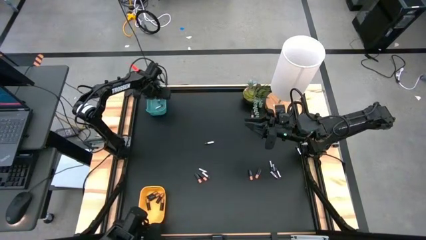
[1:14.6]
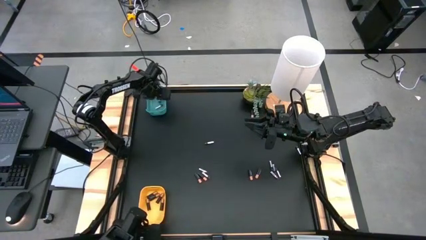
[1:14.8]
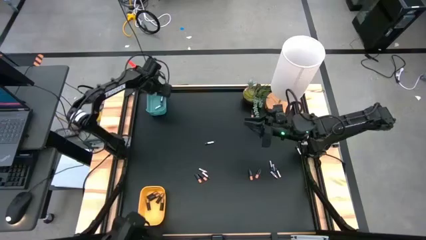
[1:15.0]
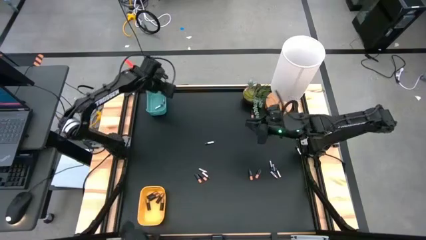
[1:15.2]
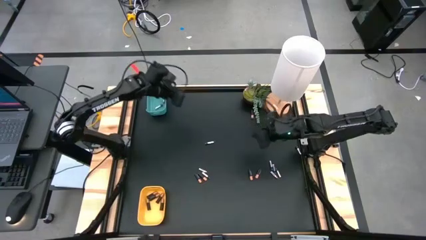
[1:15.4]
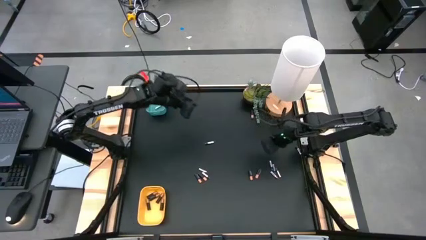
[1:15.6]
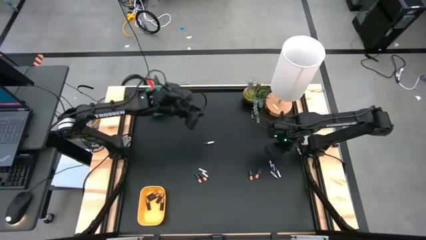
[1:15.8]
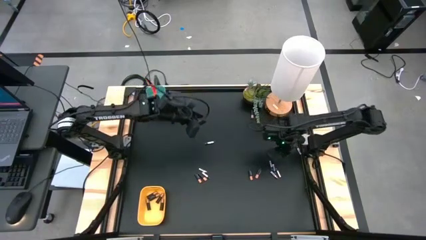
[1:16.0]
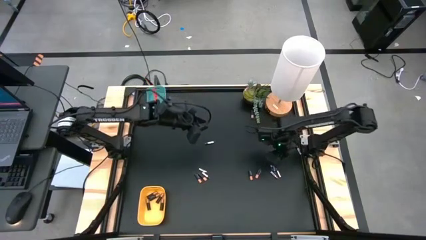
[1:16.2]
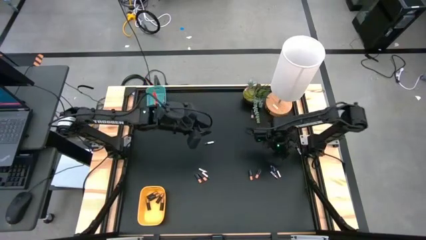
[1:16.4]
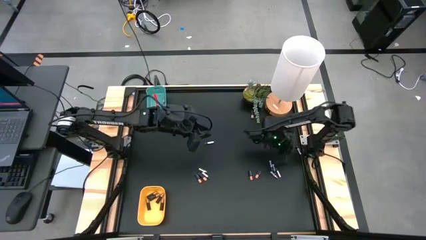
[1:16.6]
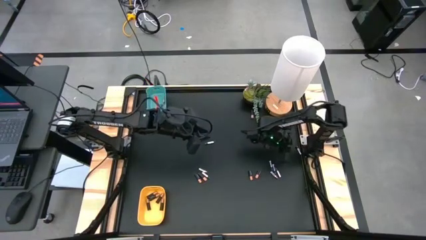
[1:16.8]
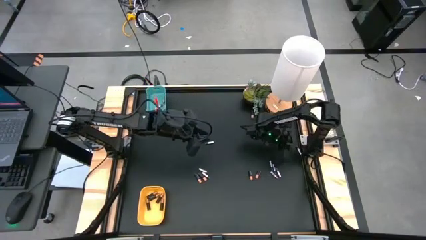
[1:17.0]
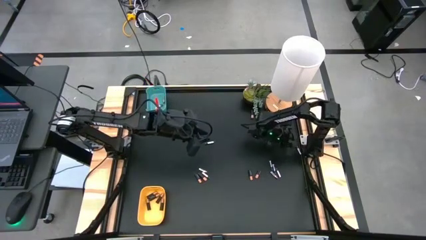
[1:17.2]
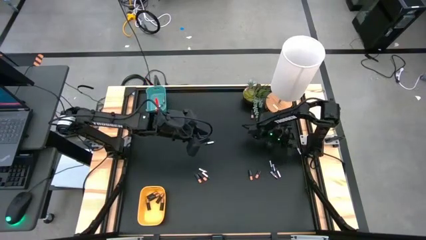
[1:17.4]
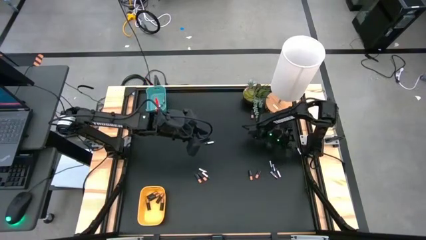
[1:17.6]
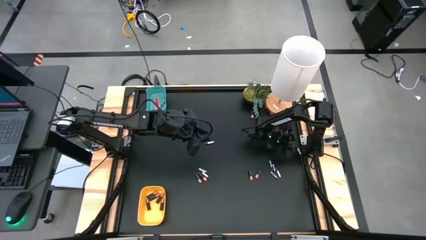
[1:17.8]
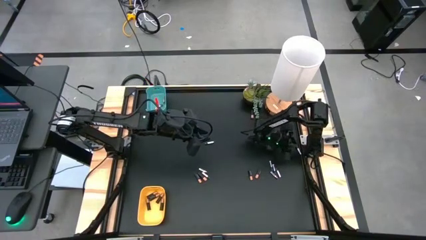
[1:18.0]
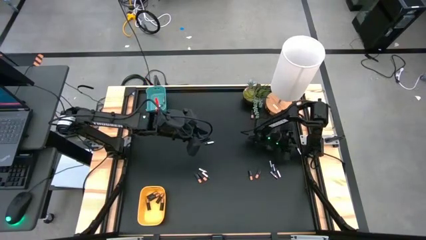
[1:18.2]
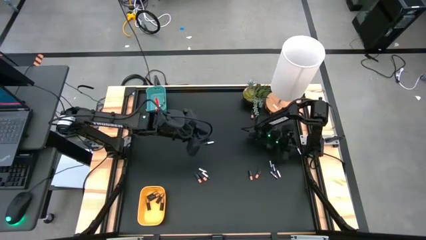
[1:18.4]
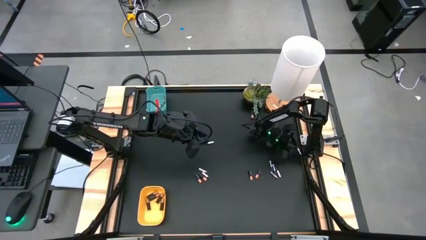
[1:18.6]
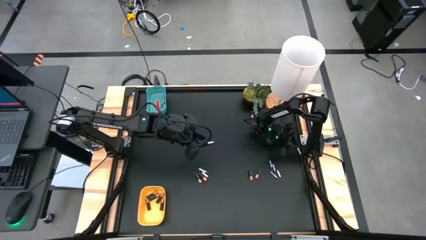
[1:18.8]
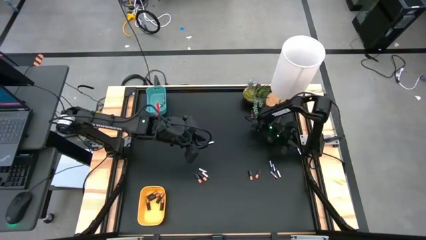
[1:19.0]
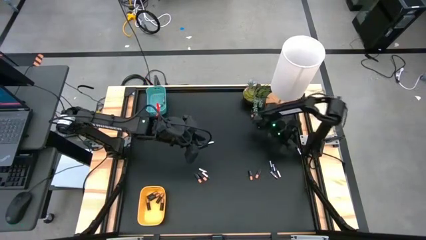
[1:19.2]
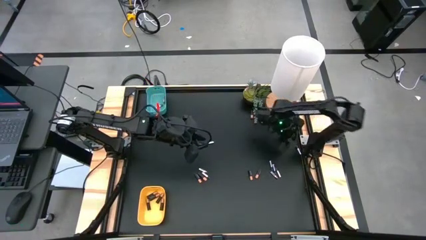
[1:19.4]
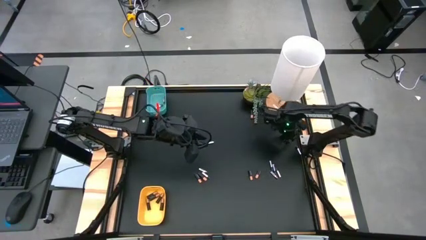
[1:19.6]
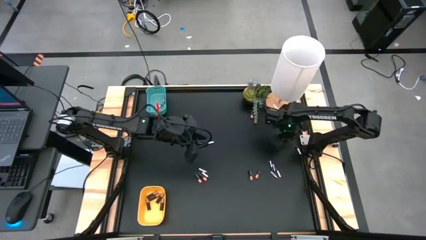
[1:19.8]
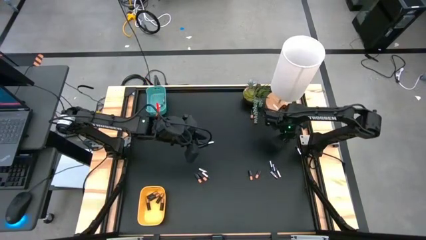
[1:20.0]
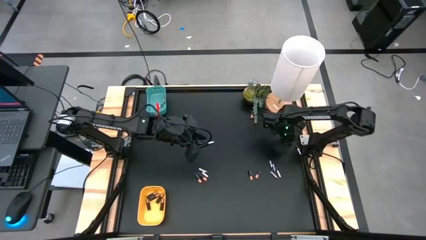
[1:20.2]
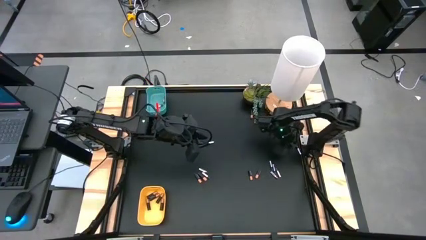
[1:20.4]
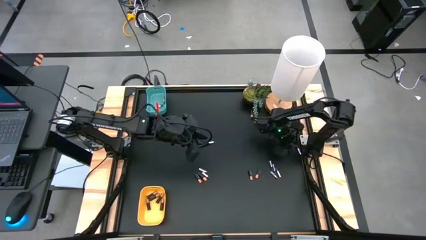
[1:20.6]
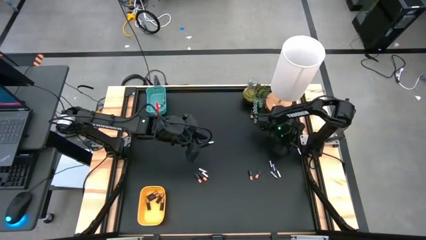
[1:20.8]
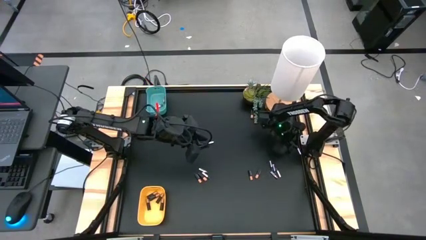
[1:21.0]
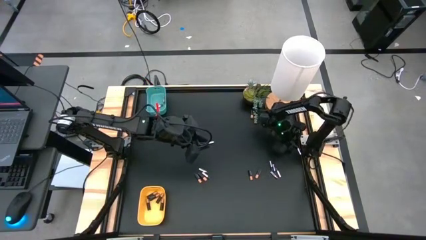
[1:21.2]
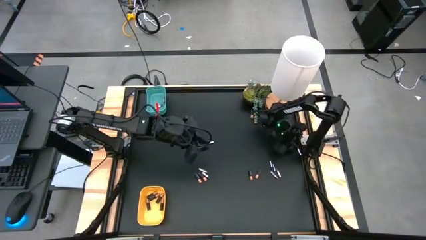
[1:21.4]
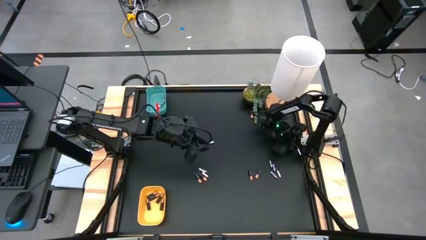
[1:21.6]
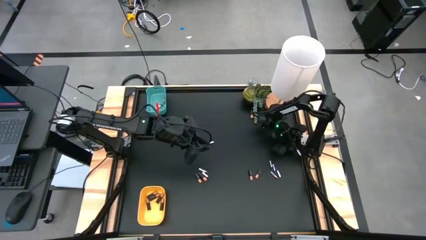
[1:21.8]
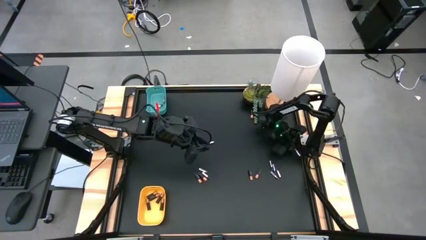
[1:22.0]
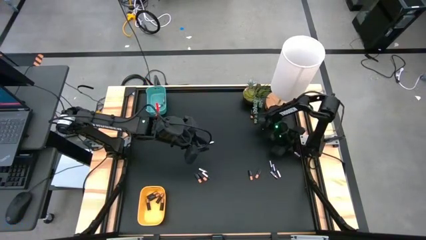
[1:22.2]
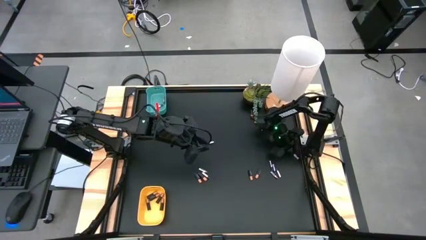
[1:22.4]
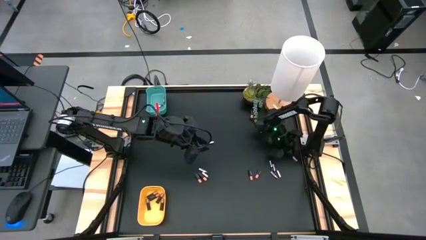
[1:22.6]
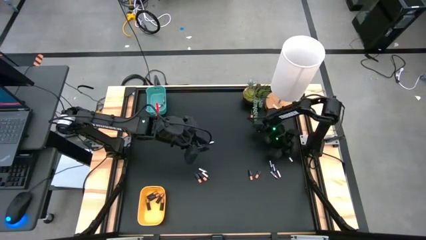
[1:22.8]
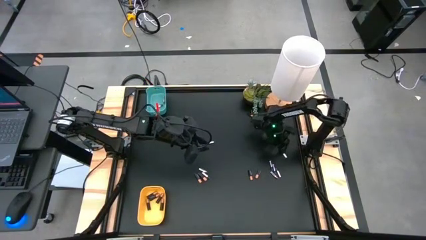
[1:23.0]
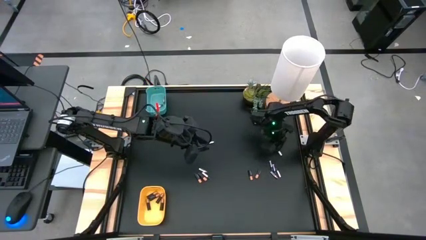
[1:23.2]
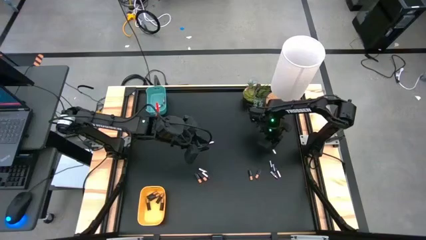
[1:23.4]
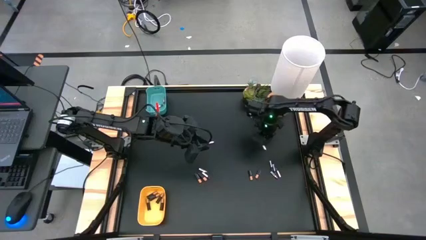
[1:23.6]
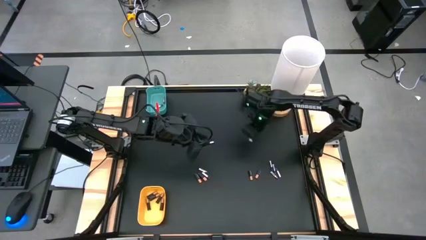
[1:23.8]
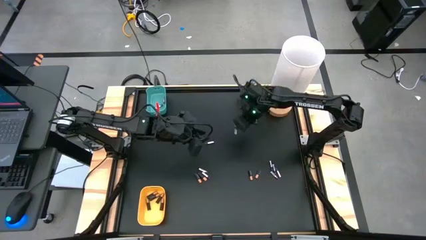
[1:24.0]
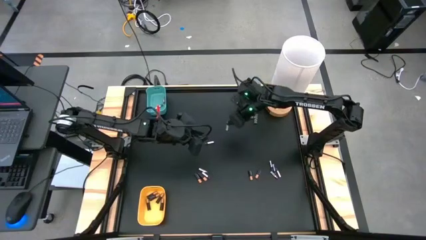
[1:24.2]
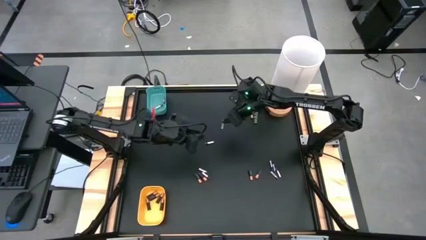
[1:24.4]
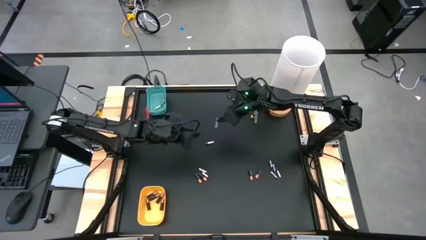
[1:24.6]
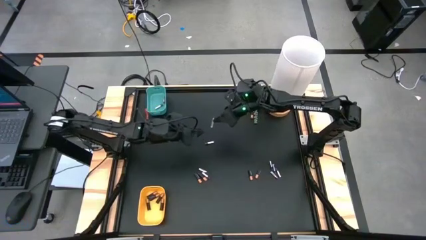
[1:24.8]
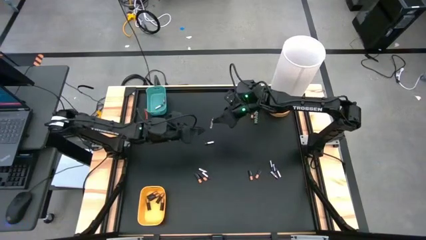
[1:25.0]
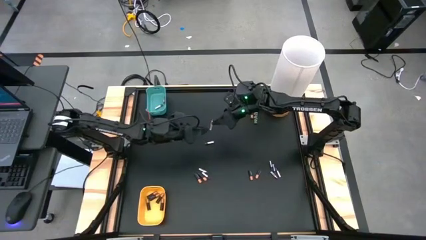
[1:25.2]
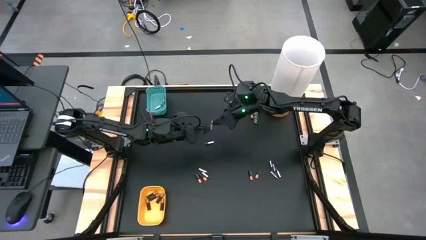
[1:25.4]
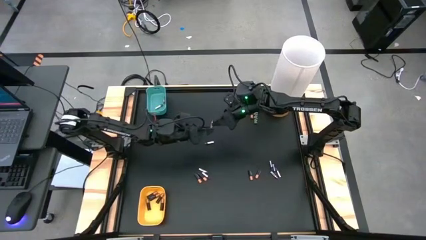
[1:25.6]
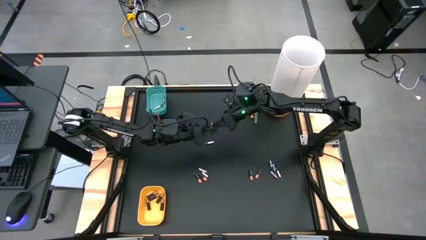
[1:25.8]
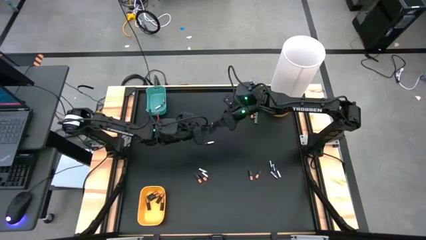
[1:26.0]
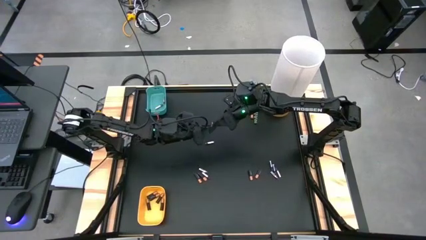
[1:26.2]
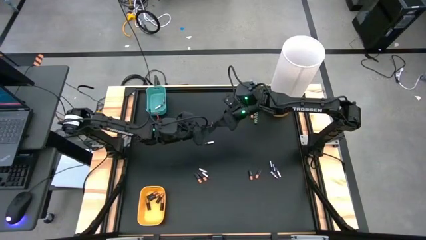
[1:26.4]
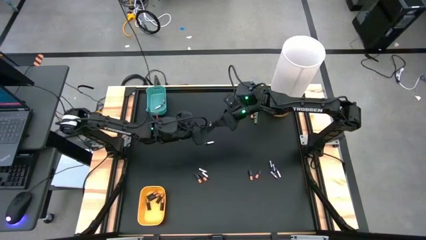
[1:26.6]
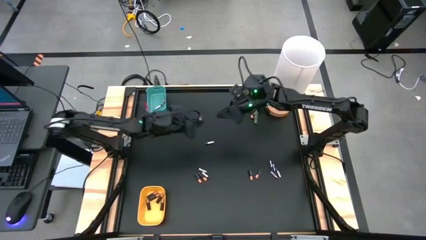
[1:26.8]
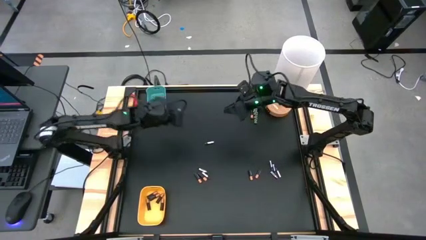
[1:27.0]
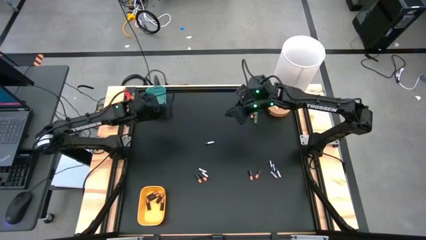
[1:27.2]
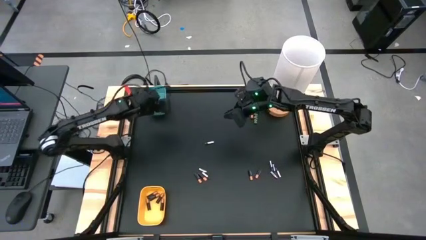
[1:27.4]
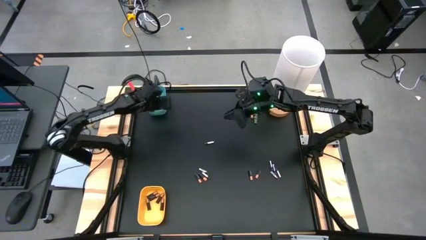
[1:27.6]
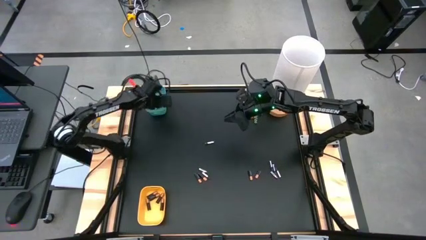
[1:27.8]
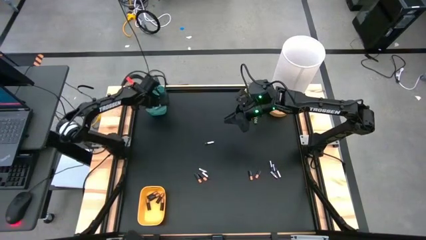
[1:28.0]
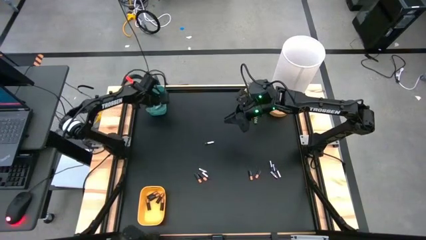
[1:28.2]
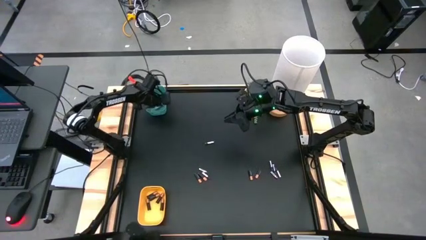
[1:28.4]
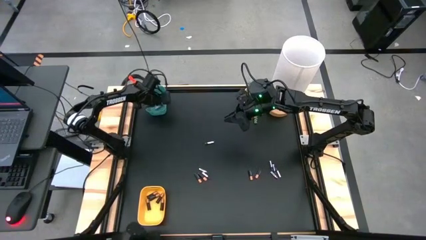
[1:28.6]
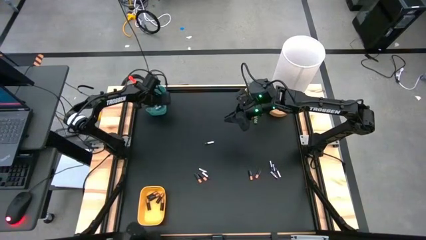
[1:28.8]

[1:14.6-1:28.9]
Task: Sort batteries
Put the silver battery into the blue bin

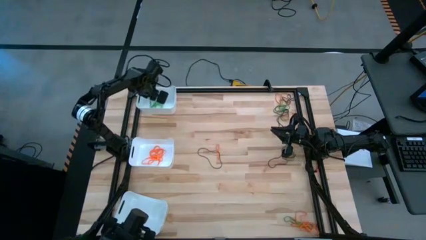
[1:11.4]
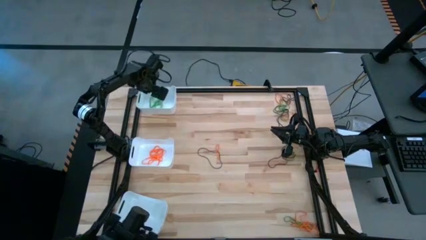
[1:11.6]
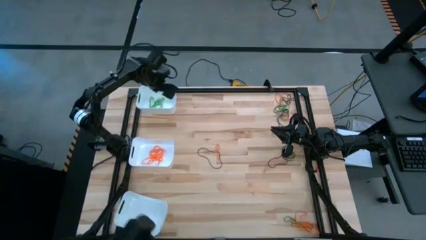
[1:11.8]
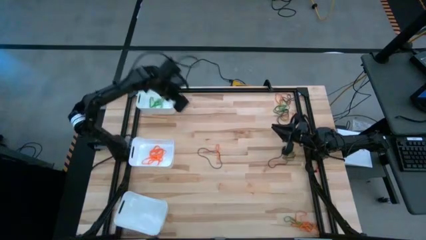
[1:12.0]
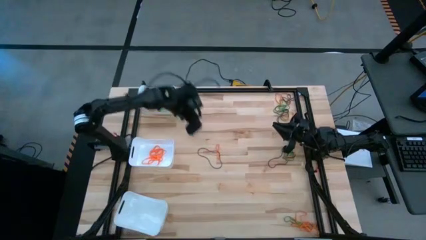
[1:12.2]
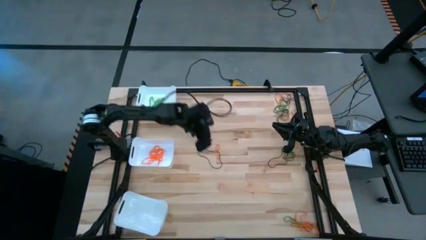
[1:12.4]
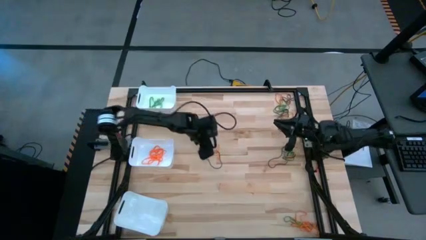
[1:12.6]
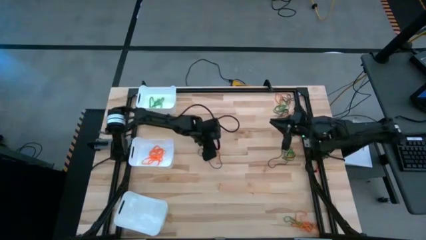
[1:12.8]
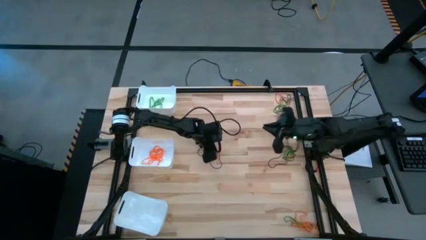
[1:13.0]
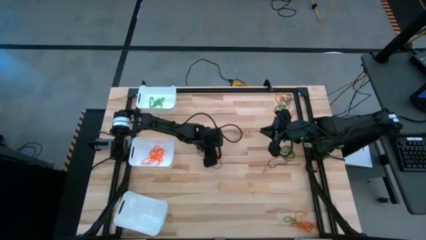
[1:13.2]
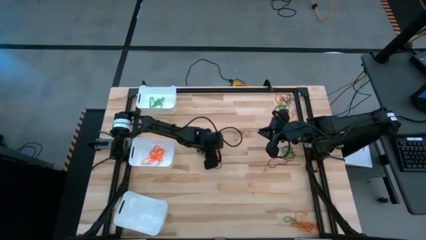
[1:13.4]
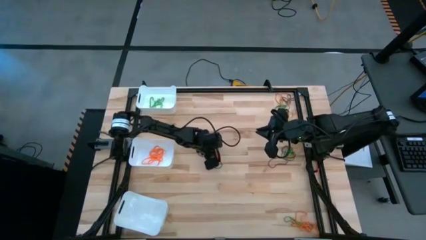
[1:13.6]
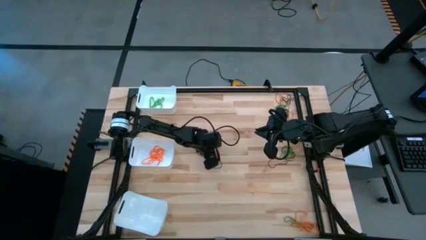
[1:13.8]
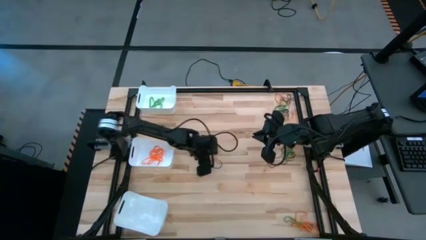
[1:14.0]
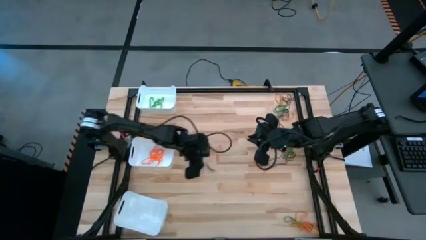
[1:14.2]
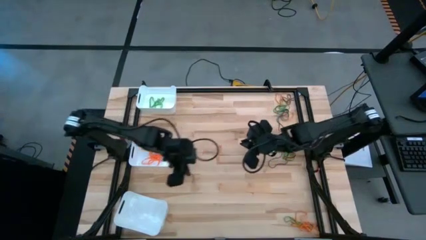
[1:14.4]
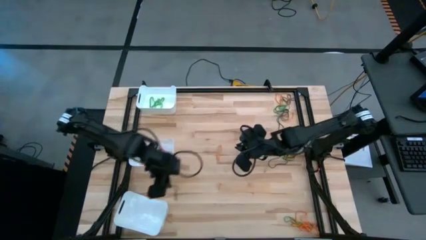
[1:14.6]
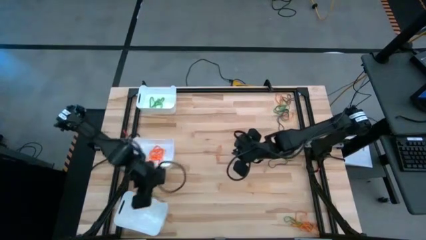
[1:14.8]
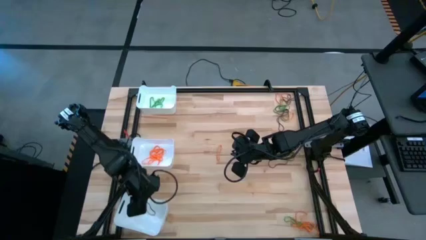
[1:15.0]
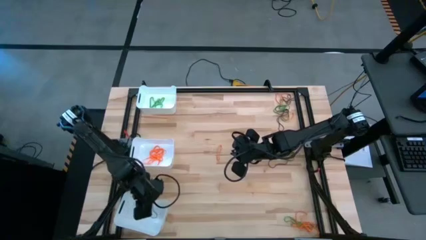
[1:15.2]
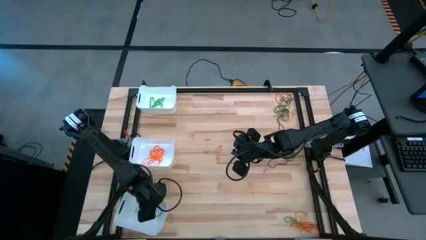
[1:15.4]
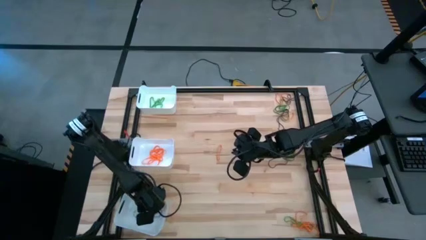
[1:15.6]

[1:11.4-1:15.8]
Task: Sort rubber bands into baskets
Put the black rubber band into the bottom white bin
